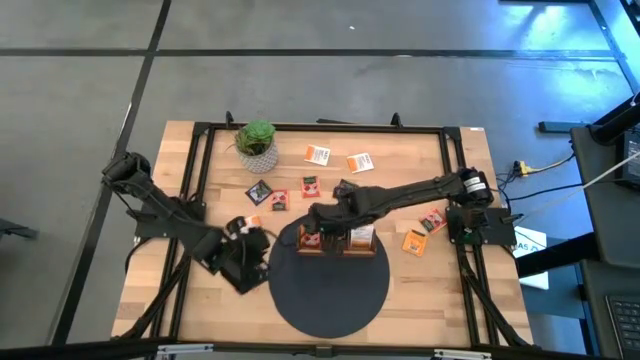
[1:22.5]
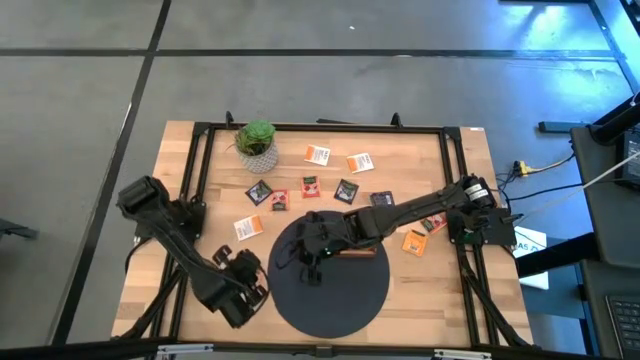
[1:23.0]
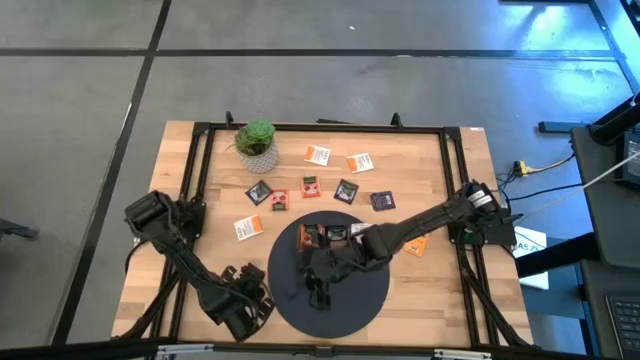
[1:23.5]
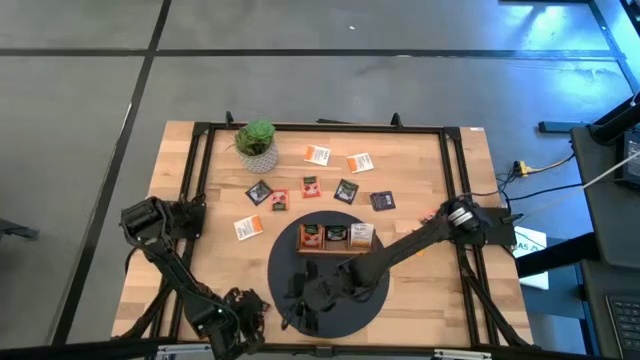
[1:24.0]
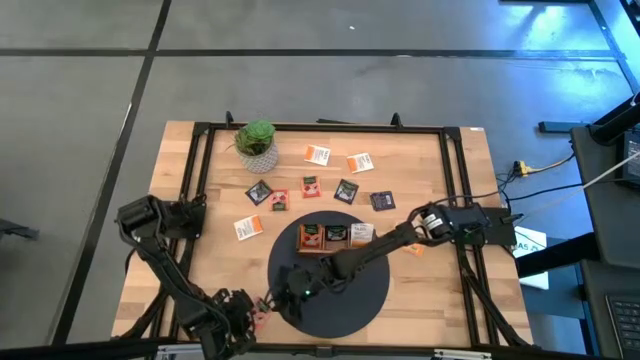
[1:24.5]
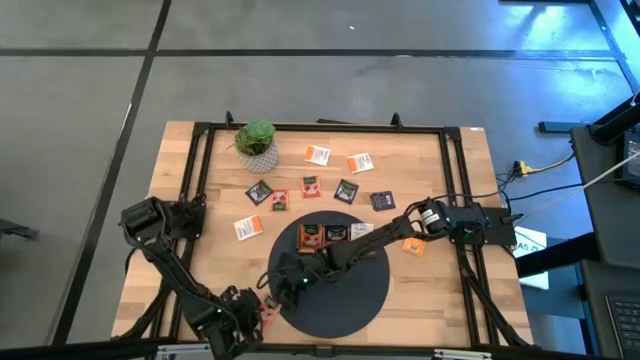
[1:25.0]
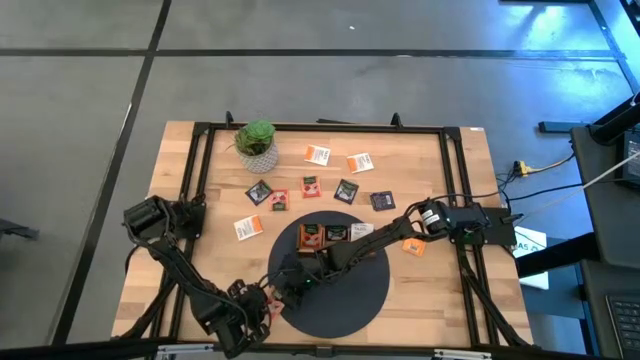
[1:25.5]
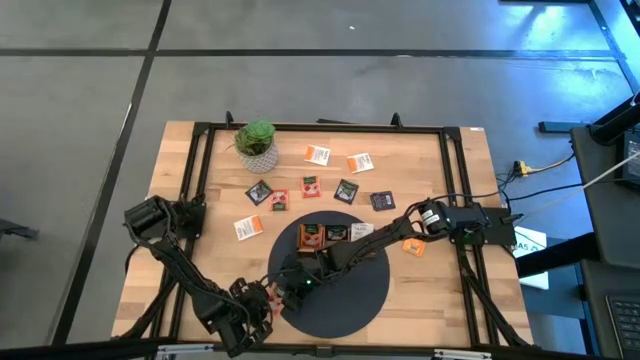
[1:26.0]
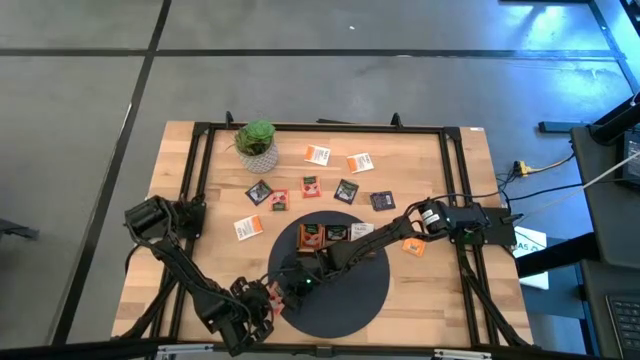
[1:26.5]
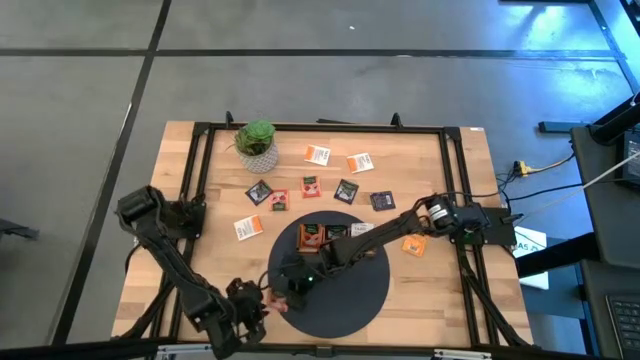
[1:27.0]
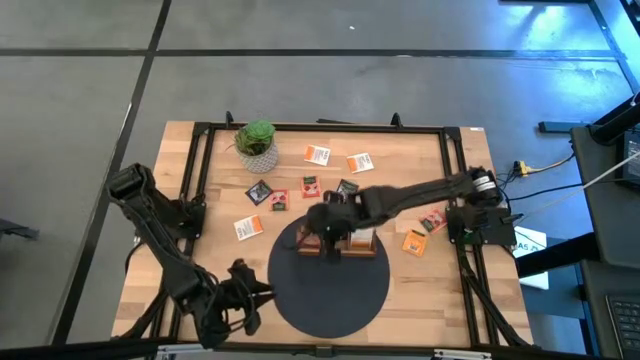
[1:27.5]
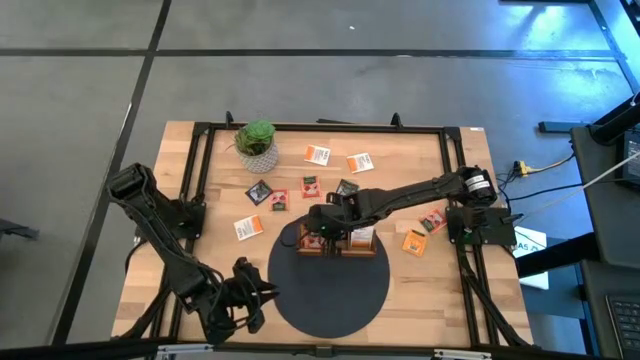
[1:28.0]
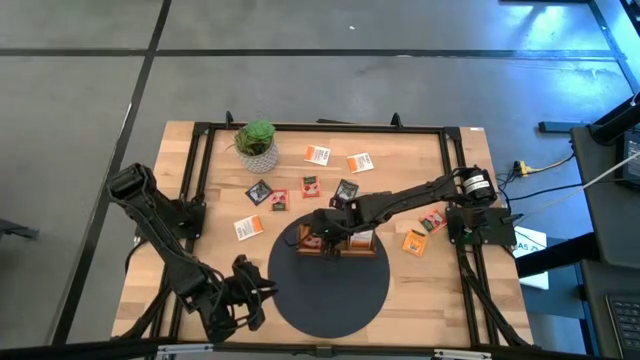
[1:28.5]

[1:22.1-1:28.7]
Task: Pick & Place Tea
Put the orange tea bag into the left slot of the wooden organizer

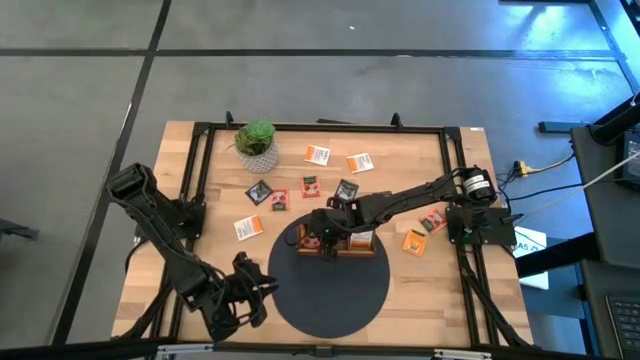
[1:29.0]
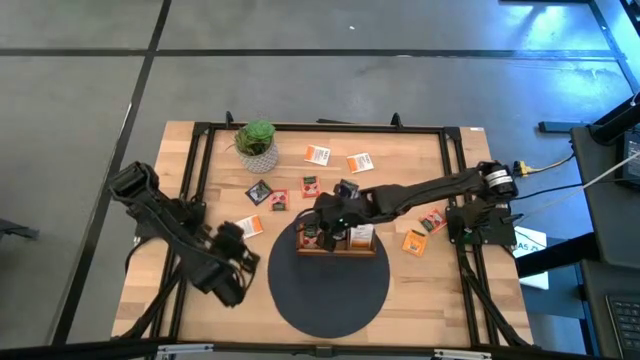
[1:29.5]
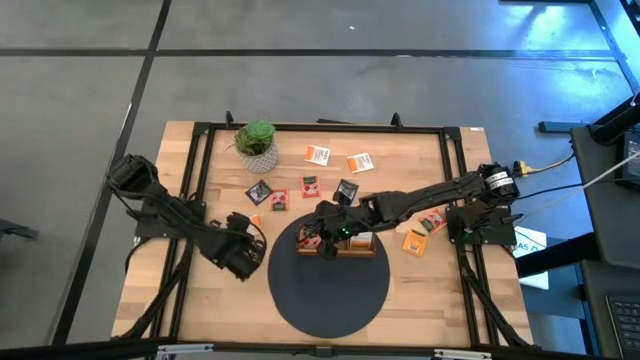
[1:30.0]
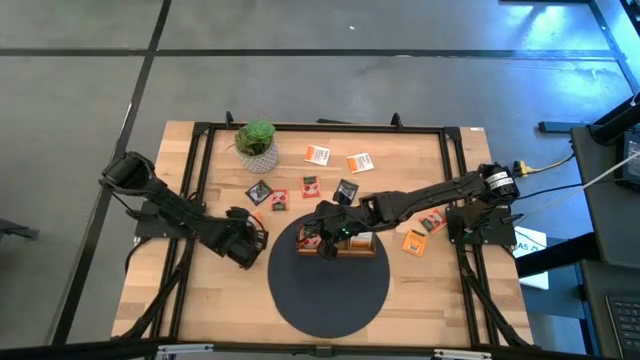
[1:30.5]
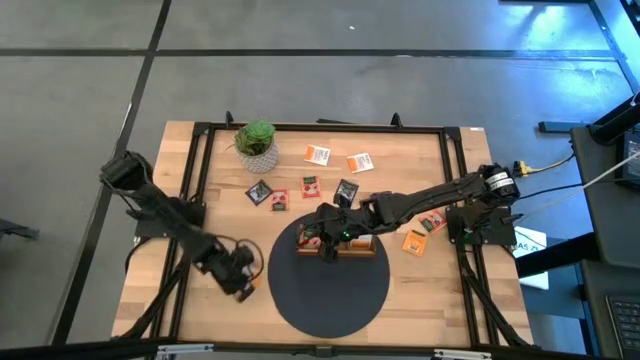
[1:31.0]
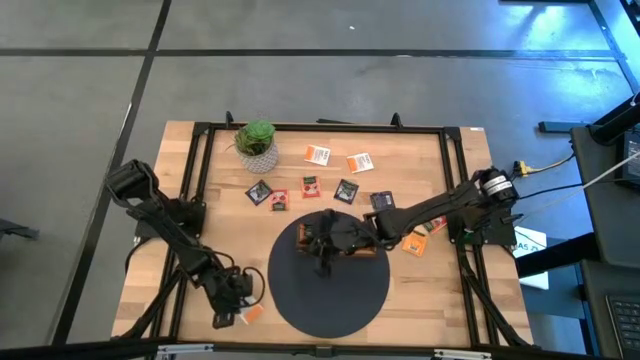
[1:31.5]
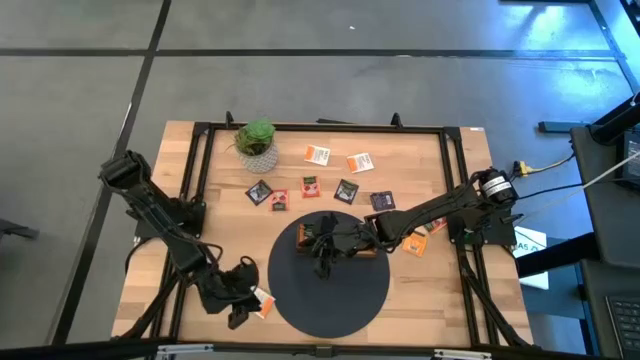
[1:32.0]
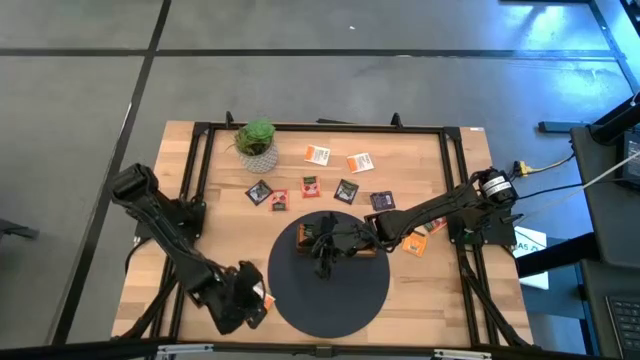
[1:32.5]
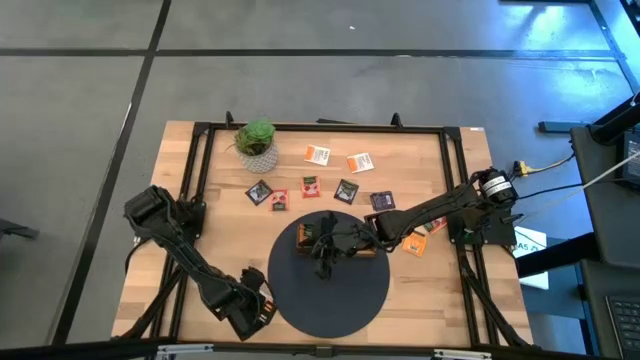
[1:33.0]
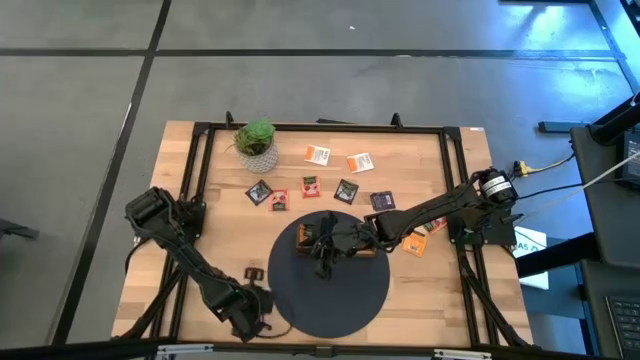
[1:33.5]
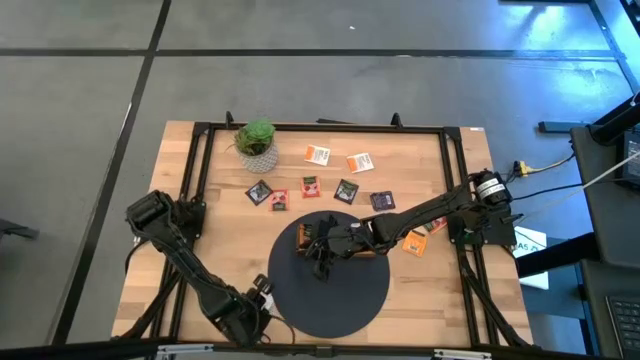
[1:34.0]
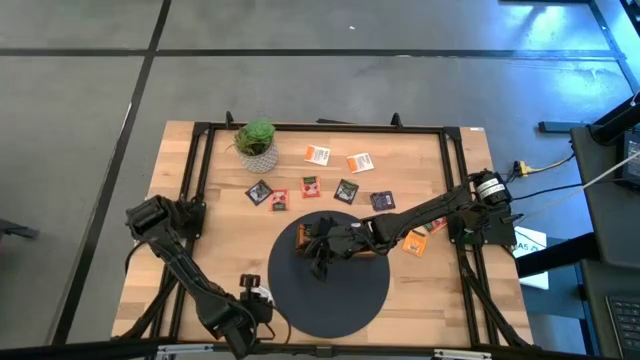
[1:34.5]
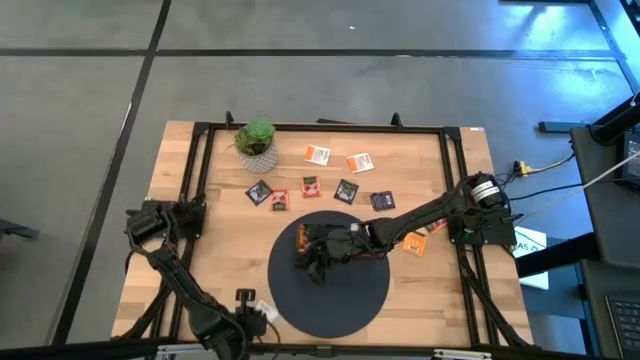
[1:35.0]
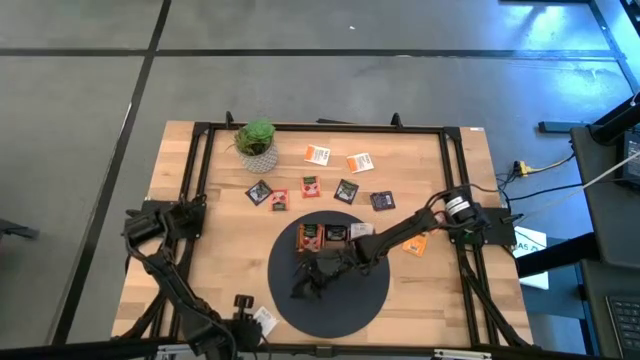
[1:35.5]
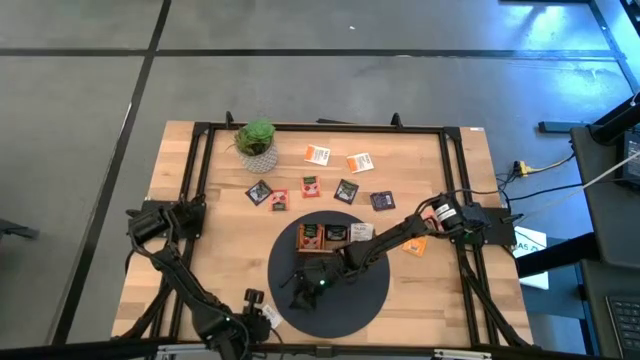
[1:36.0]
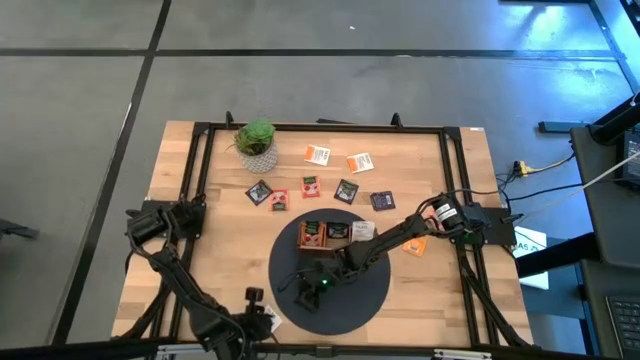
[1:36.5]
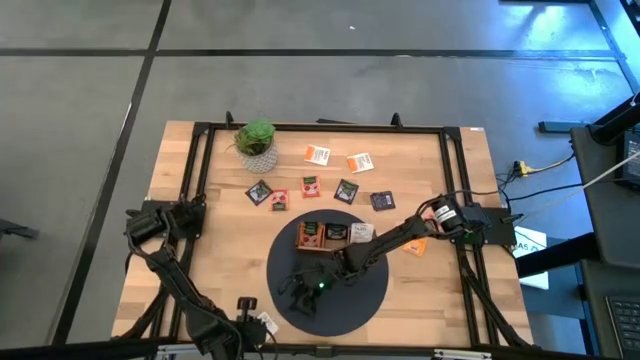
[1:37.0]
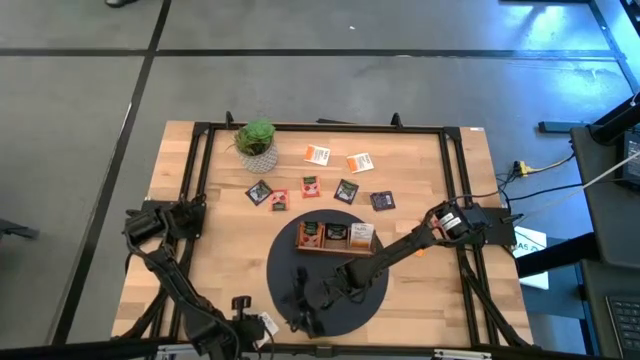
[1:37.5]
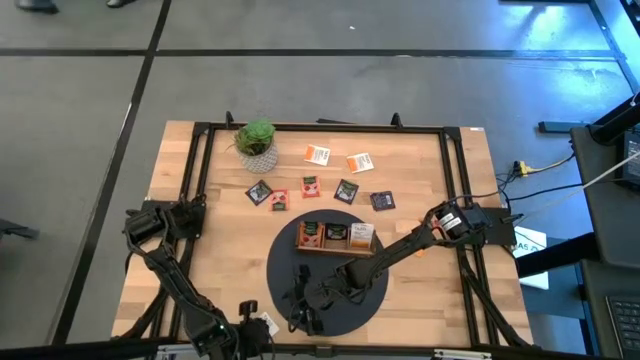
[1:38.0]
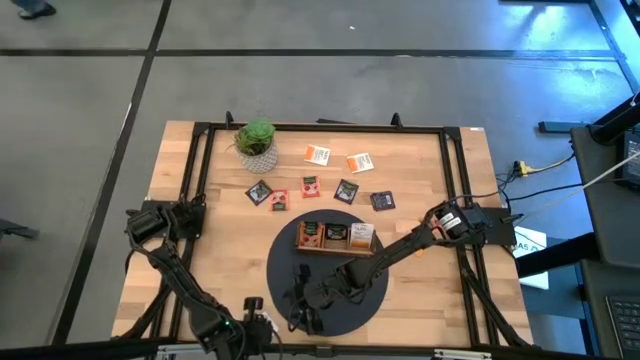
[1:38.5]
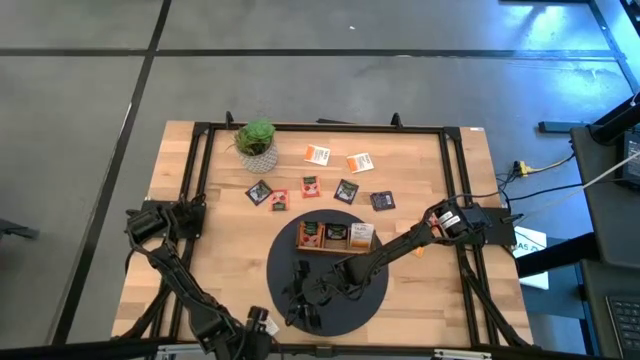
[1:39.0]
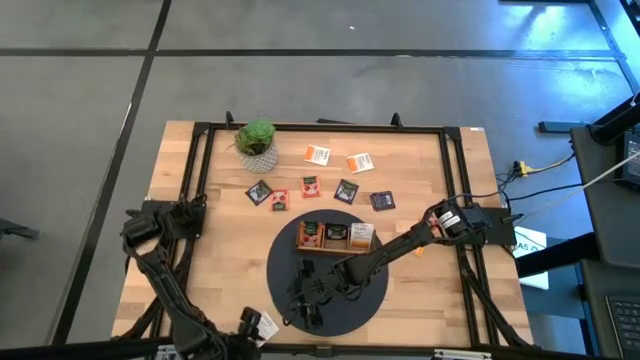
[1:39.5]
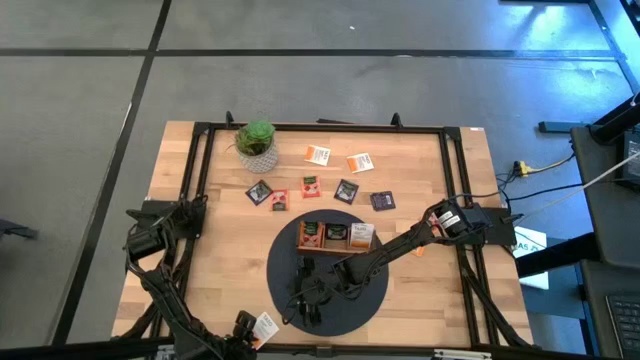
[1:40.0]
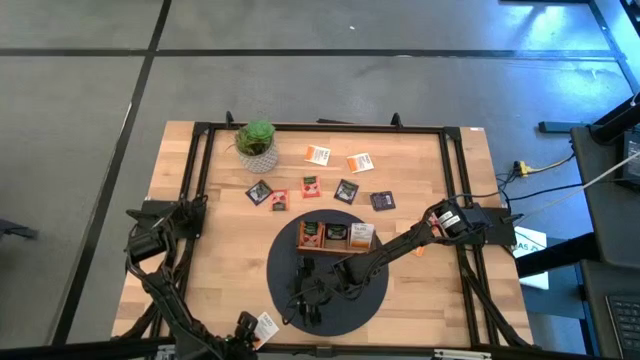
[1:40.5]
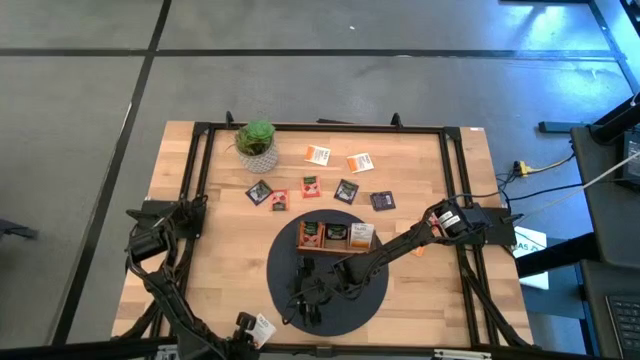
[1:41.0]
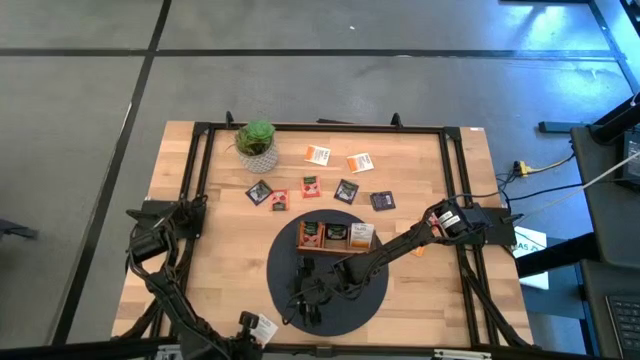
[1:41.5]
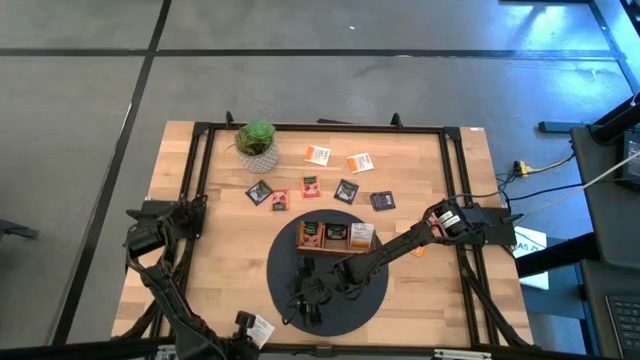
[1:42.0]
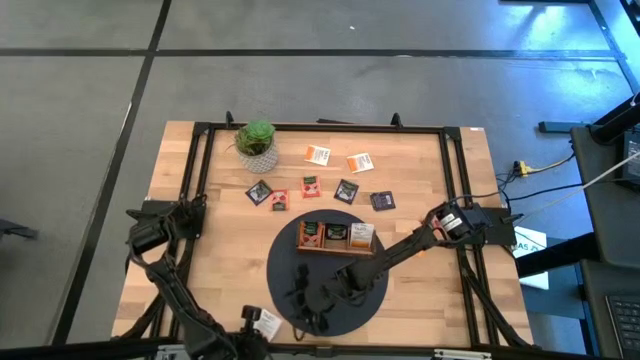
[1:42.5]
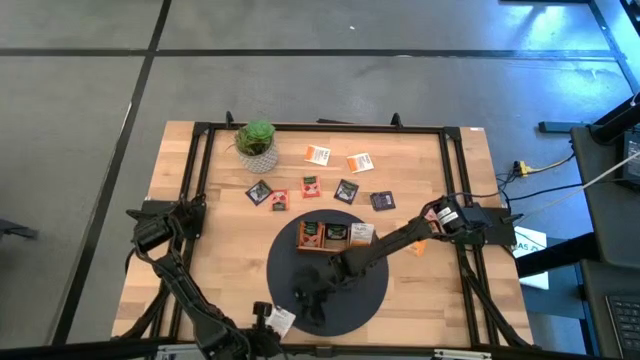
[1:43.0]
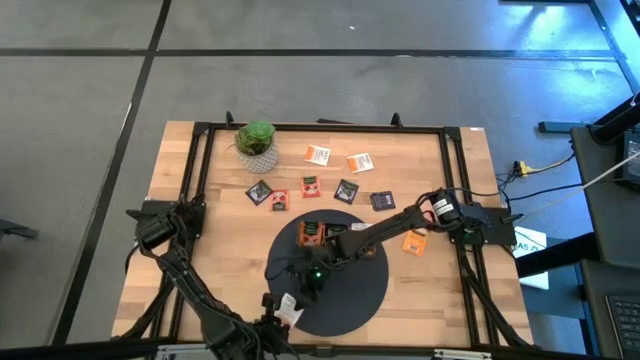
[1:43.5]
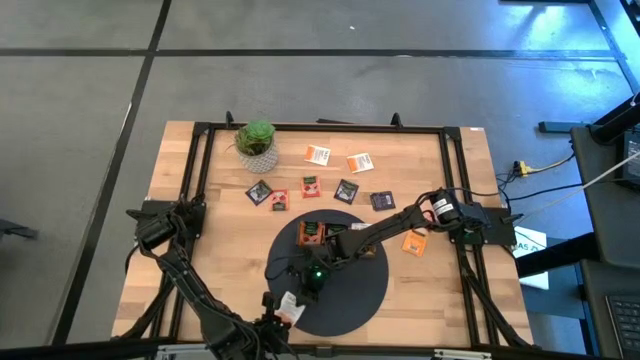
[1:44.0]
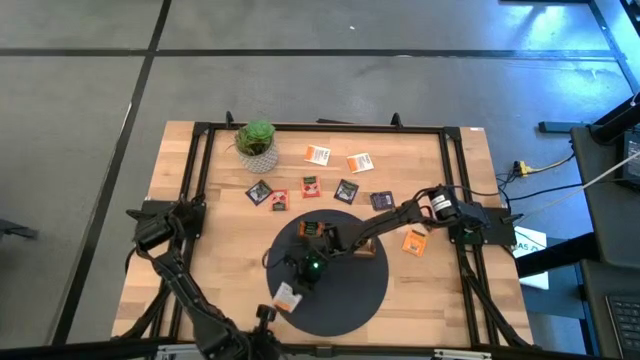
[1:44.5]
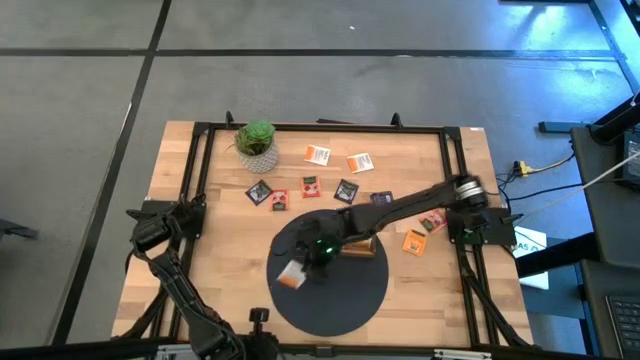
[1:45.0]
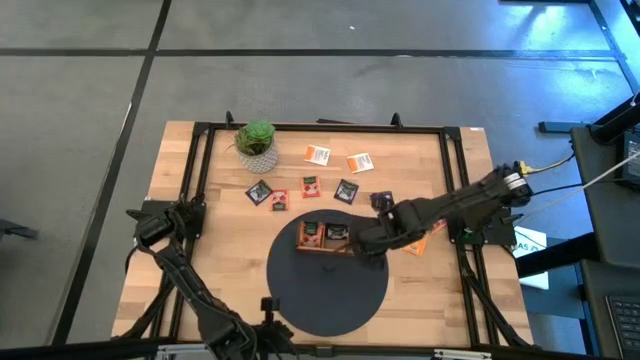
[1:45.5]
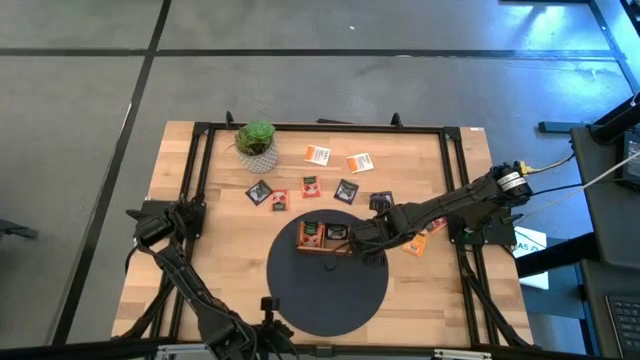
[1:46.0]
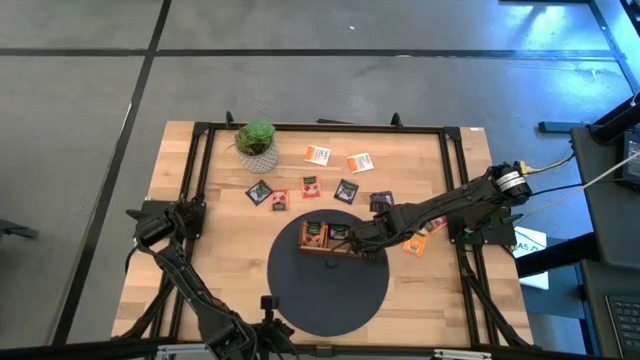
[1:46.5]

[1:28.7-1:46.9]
Put the bottom white tea bag into the right slot of the wooden organizer
